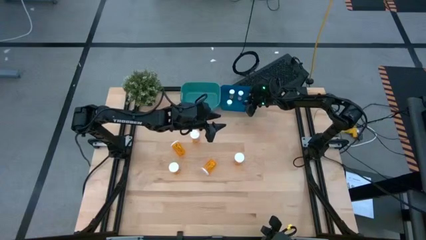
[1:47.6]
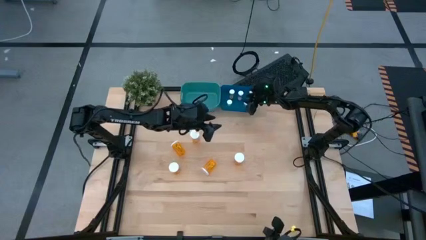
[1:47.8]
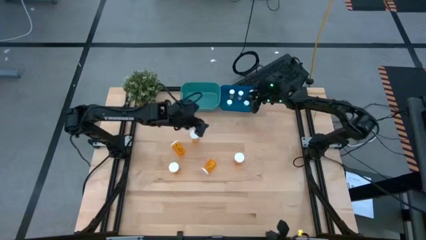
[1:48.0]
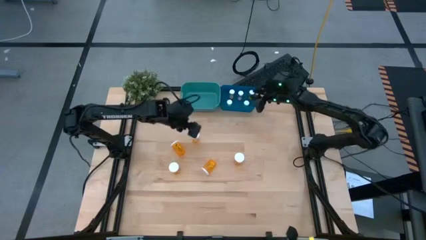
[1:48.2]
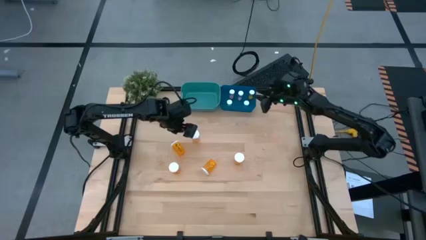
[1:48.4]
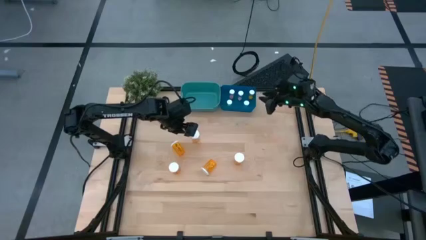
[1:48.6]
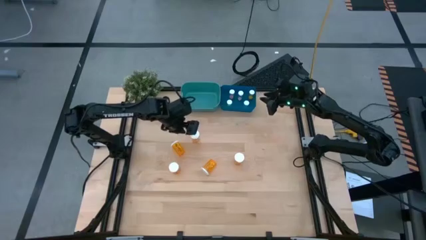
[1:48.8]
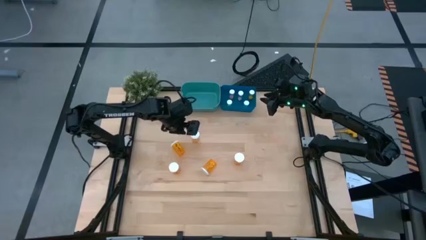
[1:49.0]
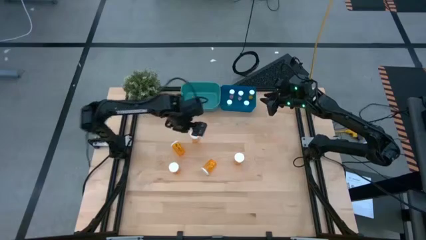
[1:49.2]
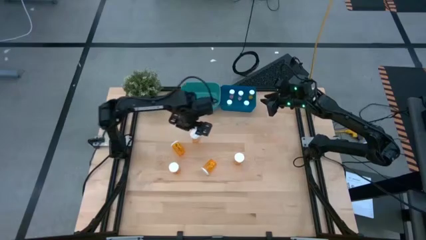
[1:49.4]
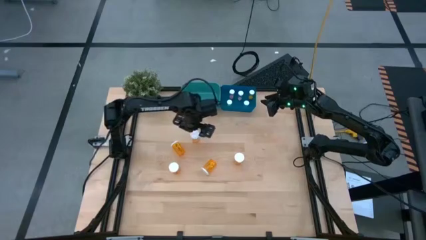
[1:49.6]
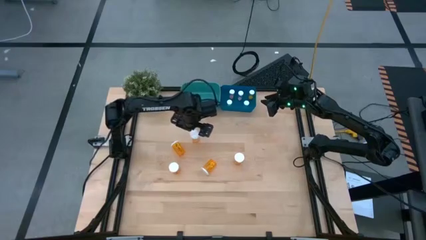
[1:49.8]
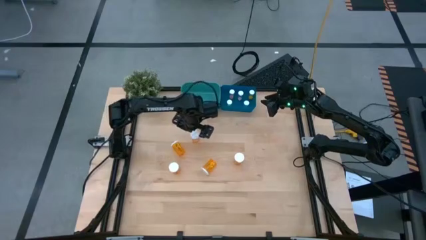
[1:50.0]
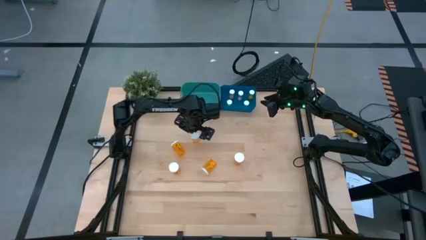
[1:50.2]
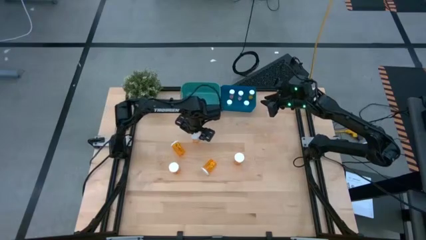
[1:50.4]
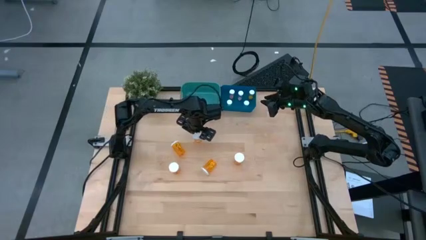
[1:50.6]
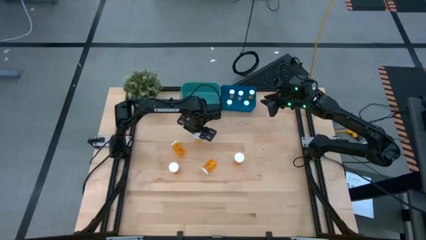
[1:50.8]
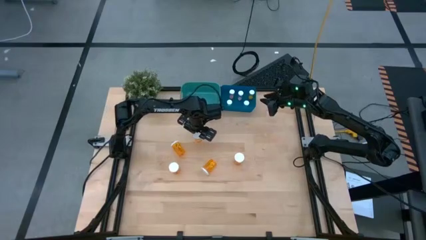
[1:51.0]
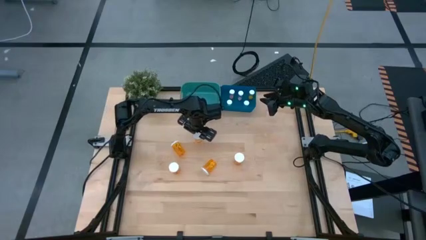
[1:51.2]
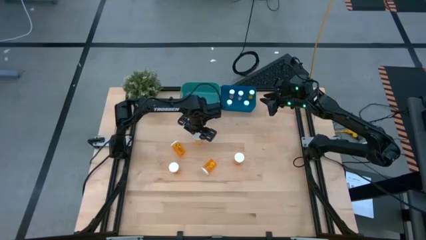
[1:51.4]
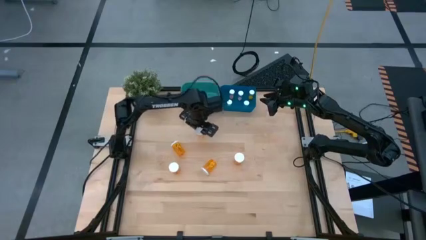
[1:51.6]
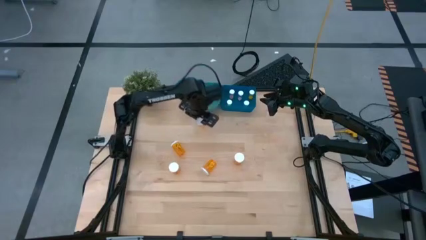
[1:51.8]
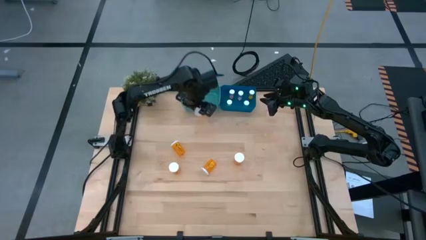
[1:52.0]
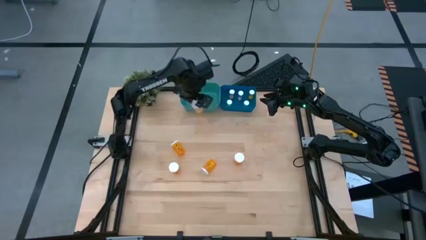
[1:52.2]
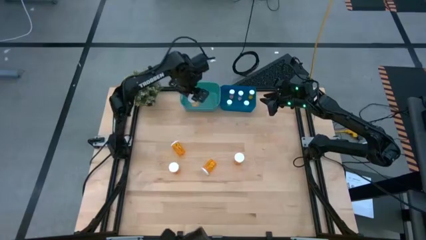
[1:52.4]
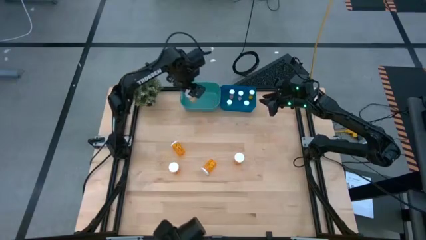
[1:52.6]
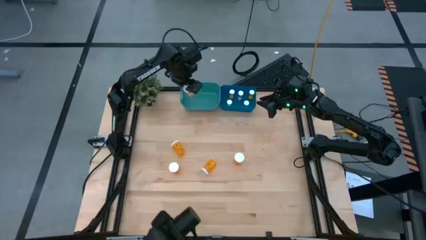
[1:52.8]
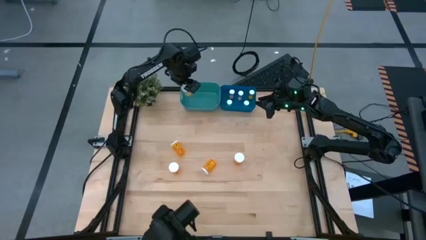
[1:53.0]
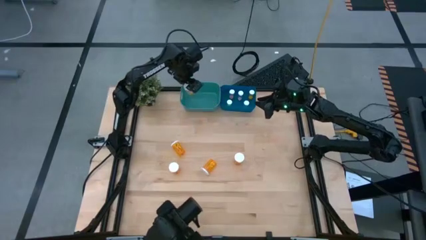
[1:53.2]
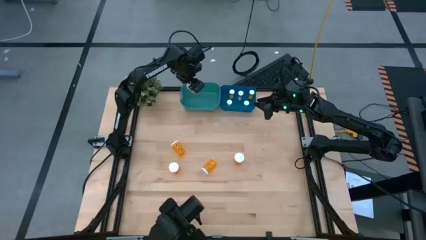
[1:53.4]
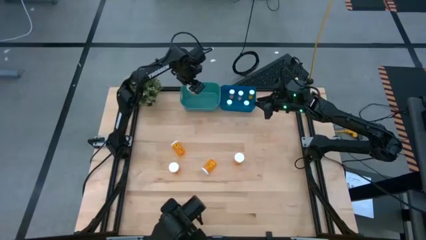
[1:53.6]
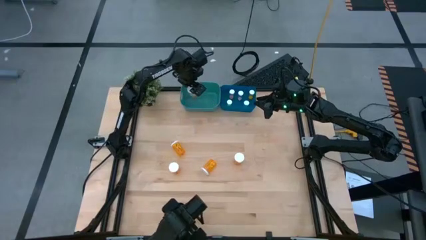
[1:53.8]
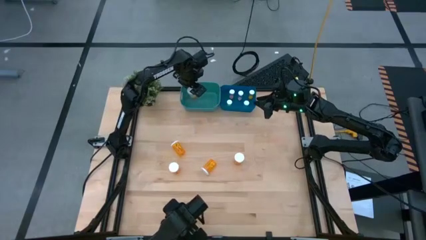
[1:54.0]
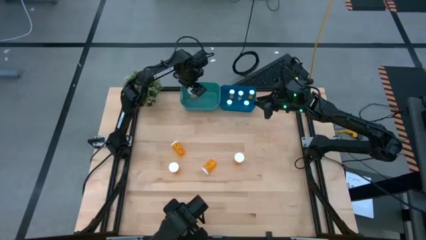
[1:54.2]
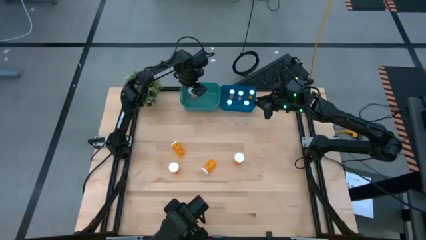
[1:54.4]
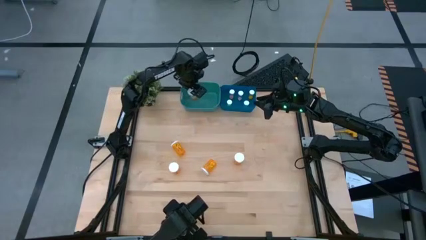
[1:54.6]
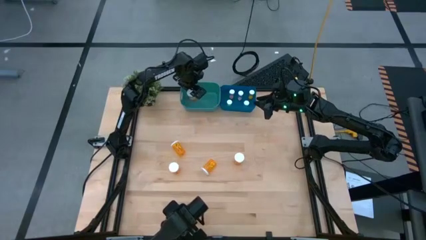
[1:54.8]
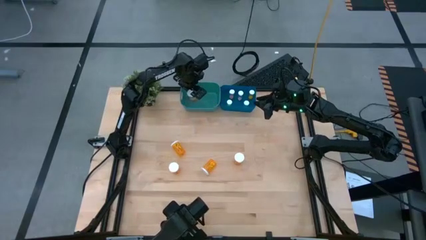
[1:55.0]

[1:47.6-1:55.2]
Task: Pick and place medicine bottles into bin by pill shape (circle, oval)
Put the large orange capsule bottle into the green bin

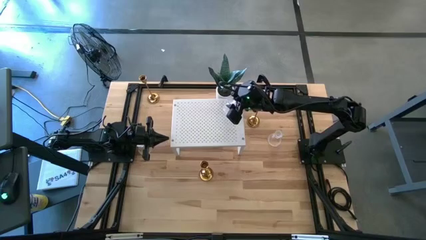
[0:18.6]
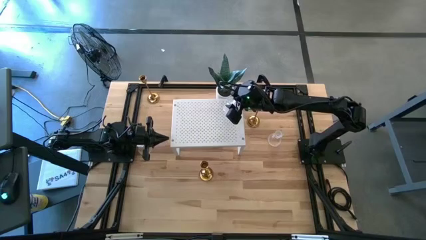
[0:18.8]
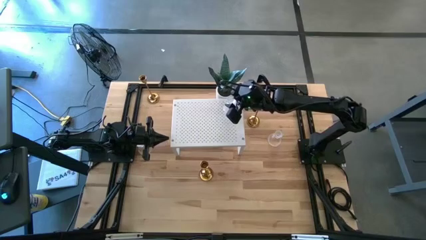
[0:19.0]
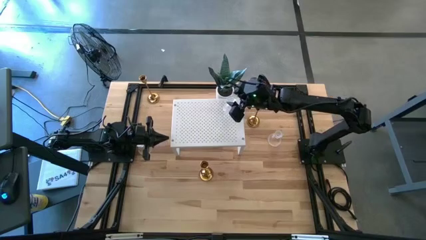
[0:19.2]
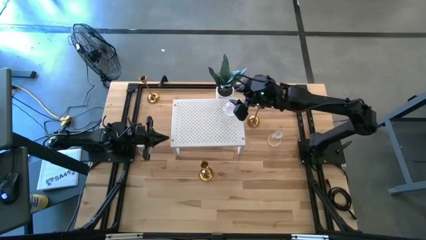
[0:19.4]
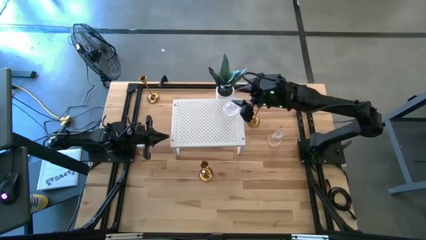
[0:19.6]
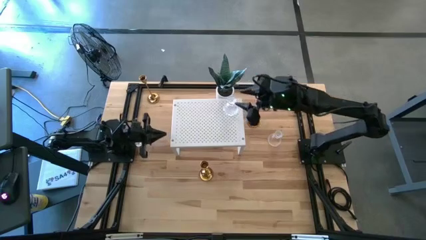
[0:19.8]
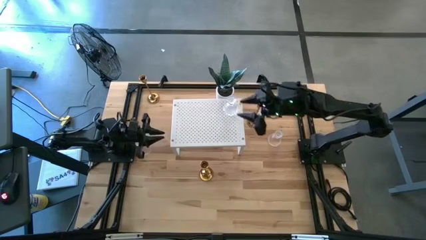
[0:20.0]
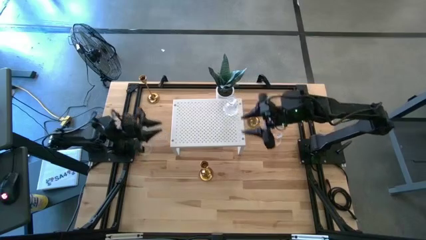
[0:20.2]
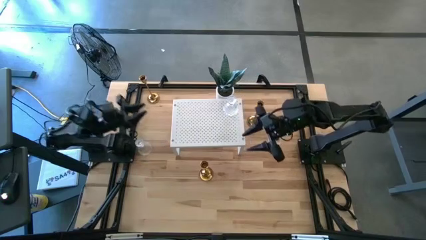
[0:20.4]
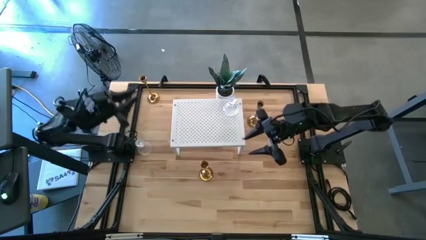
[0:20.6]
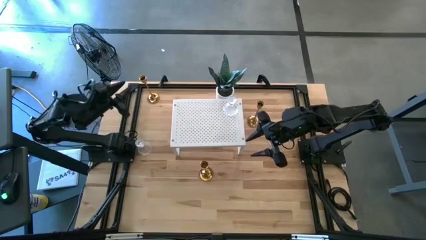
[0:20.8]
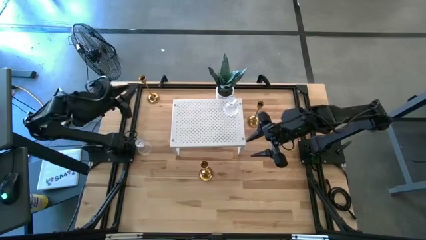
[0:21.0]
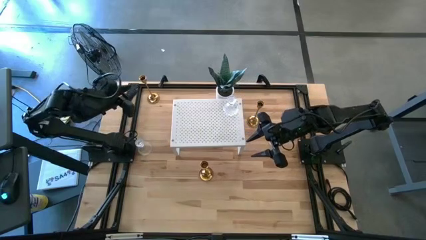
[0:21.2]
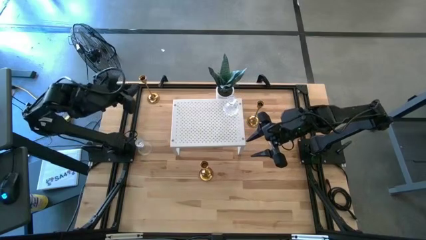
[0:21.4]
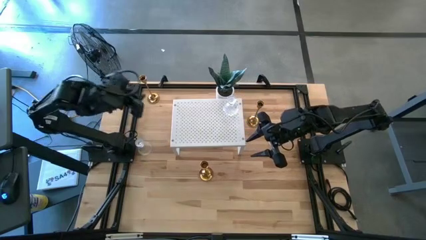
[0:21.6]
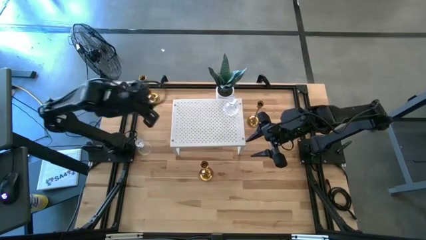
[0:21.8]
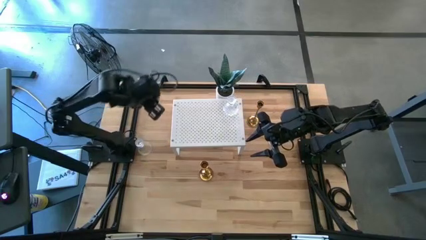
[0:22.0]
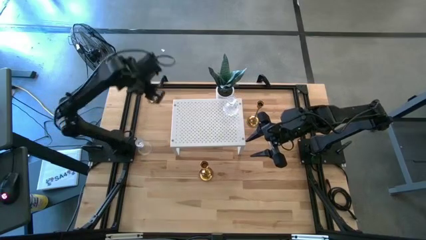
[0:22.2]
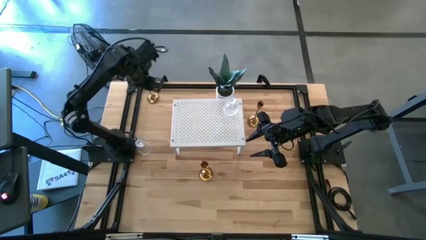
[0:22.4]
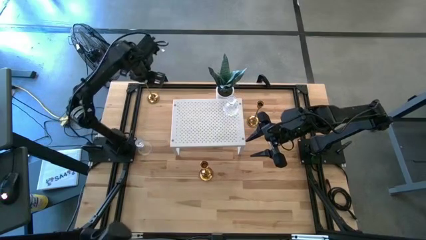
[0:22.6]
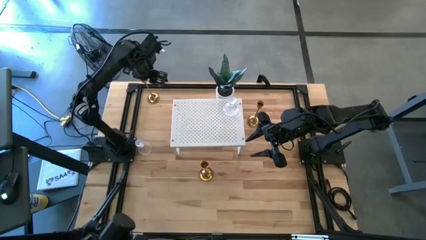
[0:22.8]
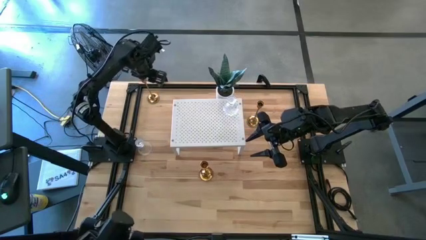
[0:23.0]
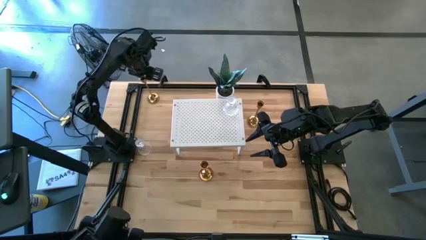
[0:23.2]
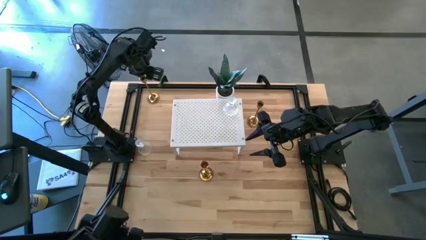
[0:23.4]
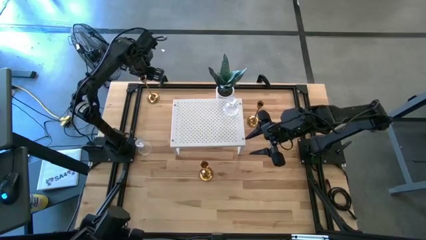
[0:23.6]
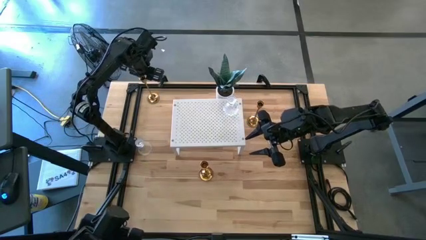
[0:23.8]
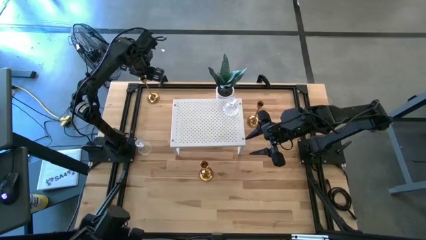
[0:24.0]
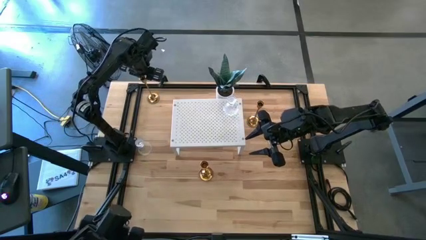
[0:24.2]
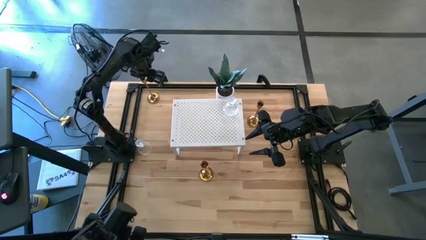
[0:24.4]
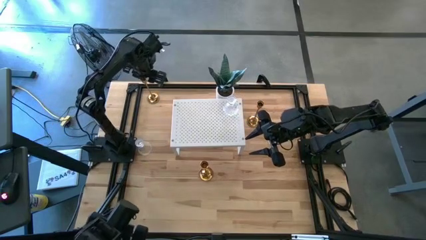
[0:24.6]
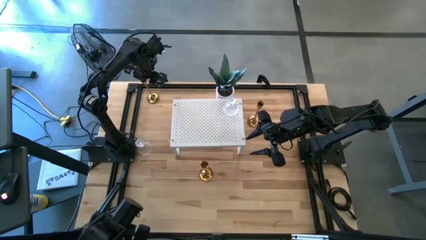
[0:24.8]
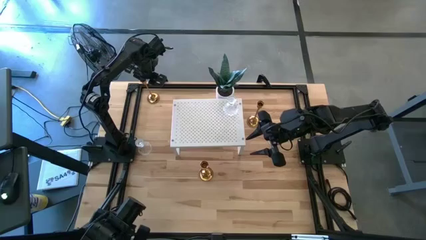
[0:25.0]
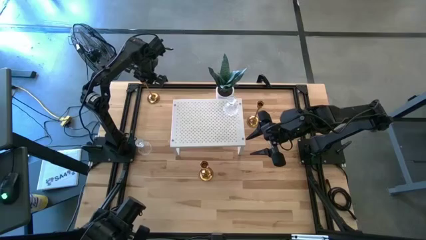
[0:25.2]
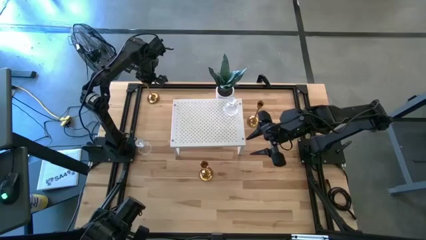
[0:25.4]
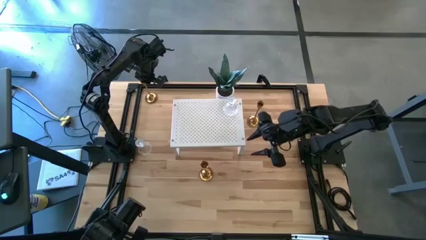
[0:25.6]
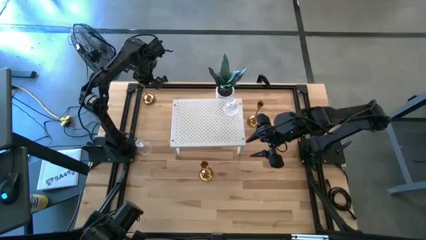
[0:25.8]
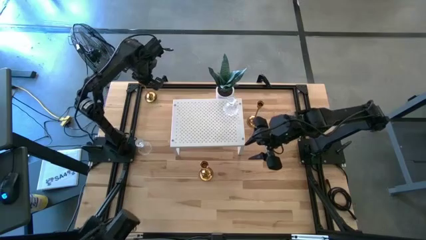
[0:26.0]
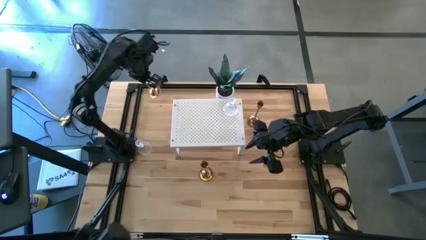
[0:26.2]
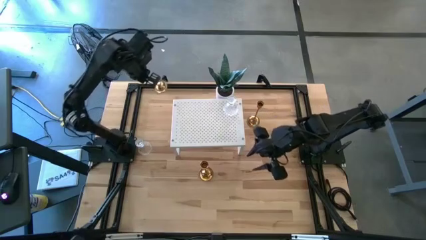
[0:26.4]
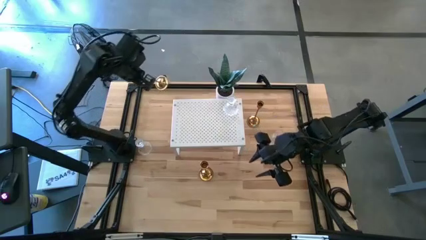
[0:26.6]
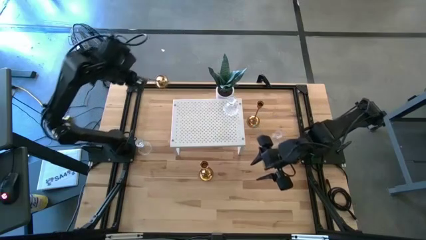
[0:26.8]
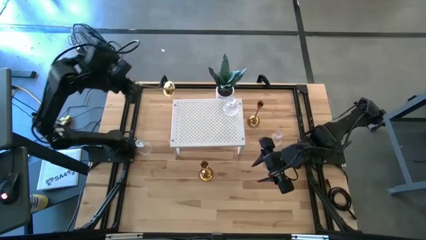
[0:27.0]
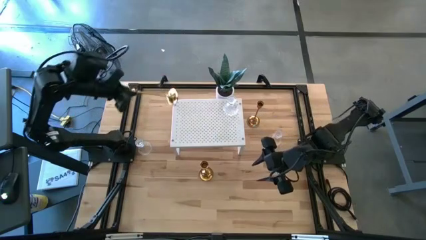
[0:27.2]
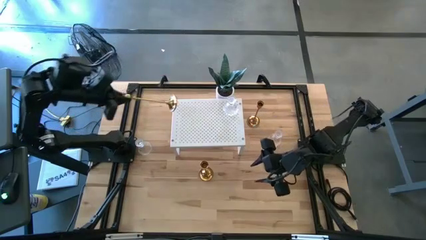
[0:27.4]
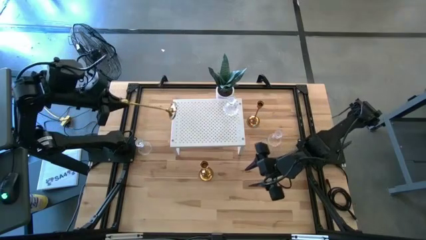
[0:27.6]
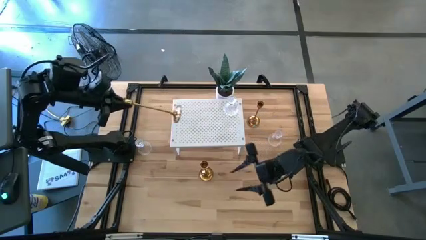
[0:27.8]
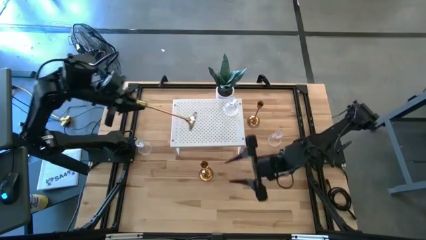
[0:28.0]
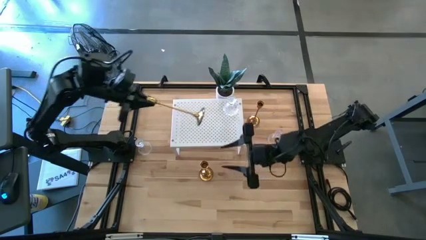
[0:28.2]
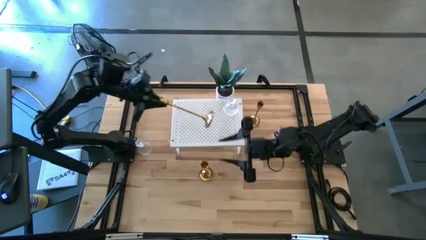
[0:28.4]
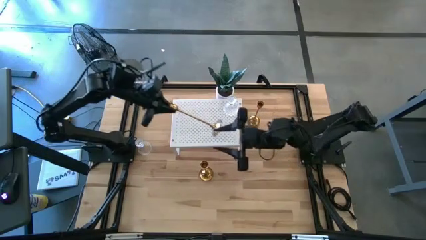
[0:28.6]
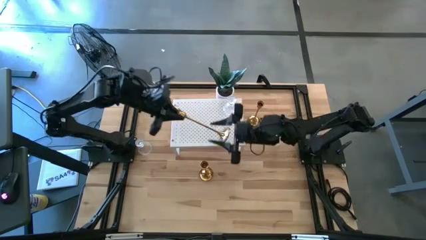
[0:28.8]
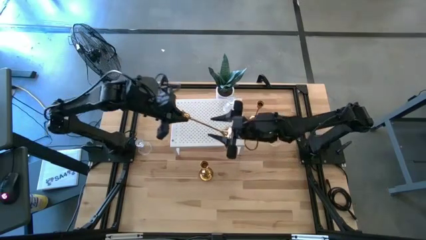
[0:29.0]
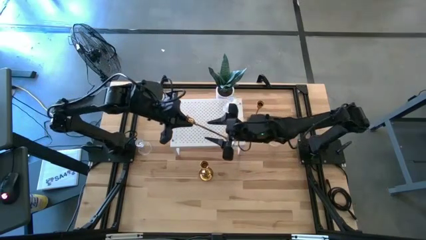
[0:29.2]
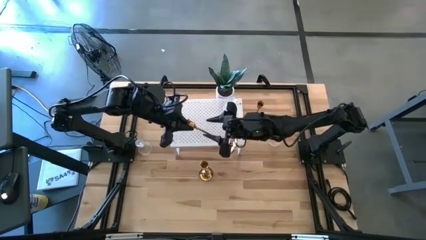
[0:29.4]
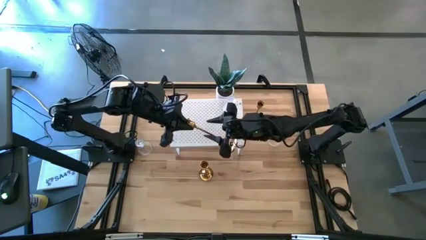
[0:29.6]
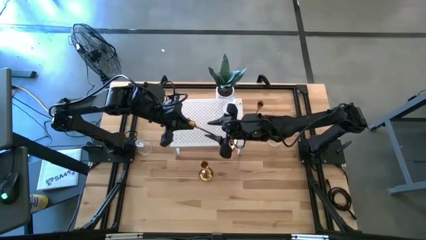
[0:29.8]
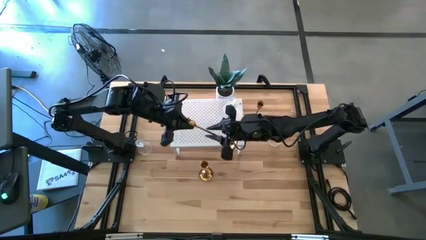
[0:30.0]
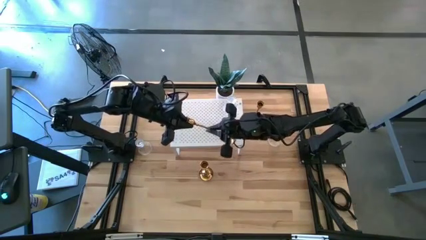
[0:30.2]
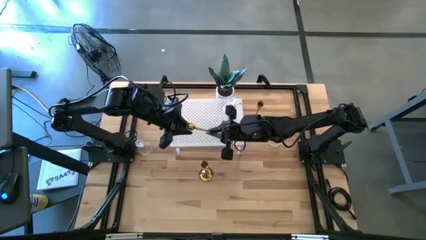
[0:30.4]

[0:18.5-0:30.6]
Task: Pick & Place candle stick holders
Put the top left gold candle holder on the shelf
